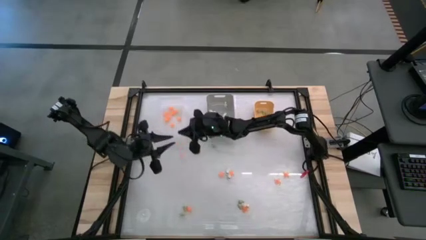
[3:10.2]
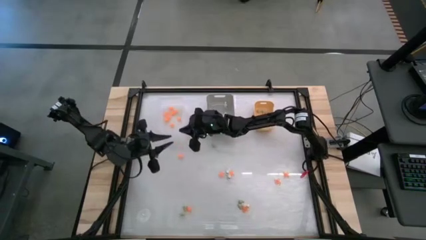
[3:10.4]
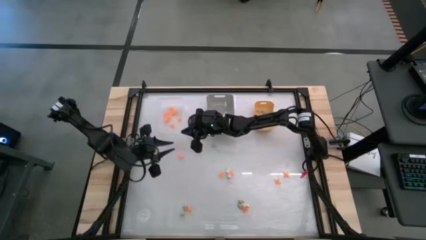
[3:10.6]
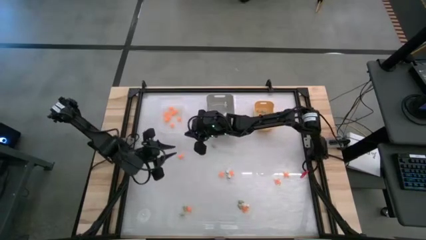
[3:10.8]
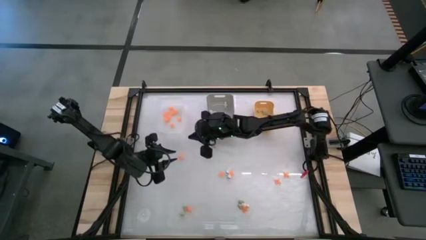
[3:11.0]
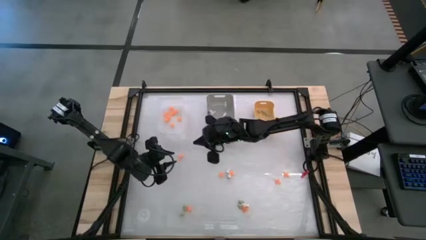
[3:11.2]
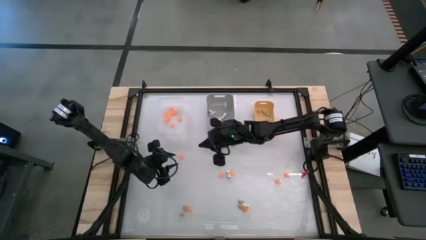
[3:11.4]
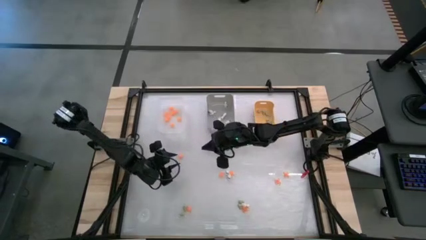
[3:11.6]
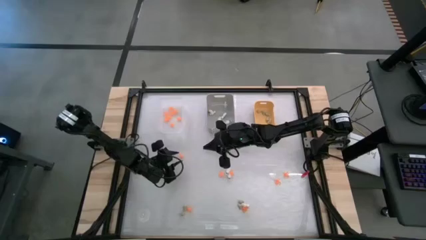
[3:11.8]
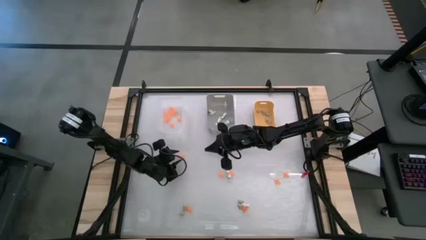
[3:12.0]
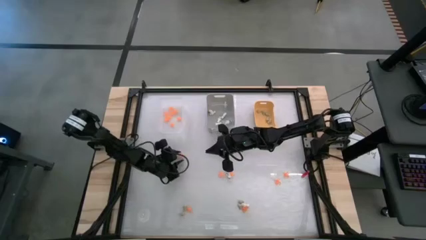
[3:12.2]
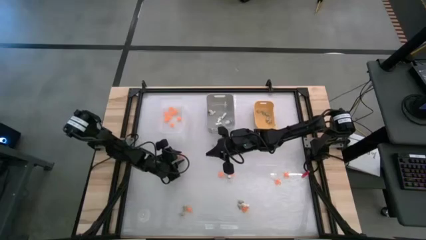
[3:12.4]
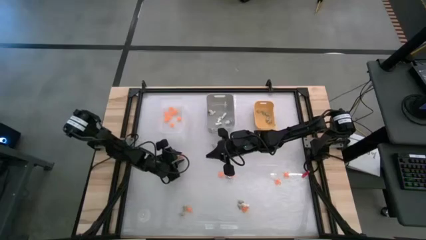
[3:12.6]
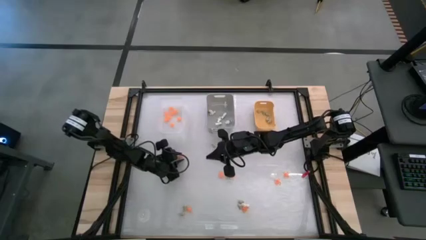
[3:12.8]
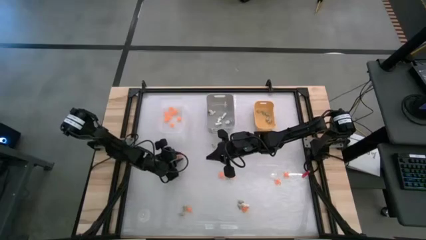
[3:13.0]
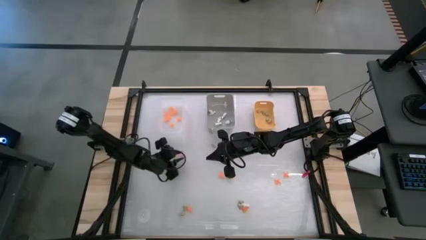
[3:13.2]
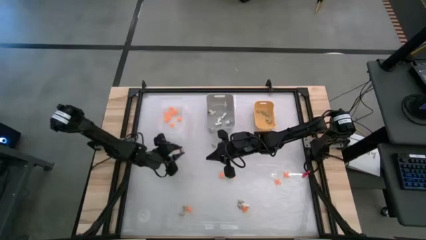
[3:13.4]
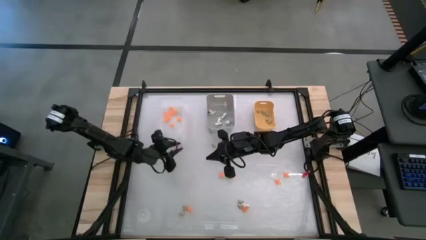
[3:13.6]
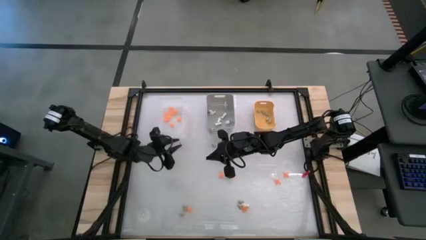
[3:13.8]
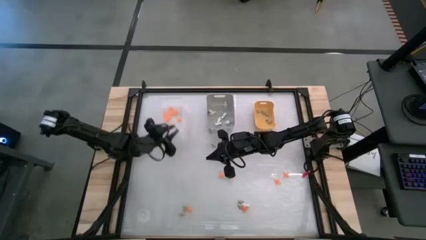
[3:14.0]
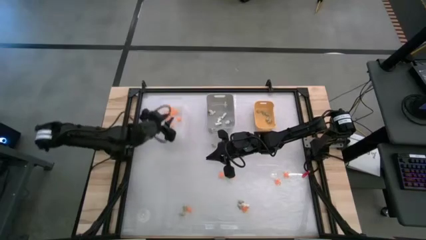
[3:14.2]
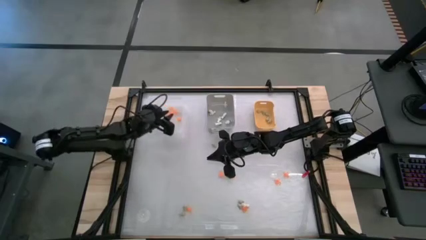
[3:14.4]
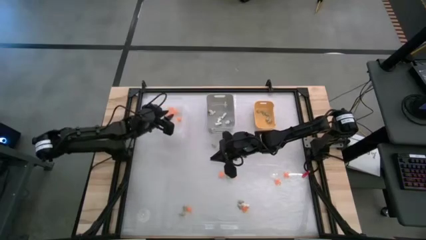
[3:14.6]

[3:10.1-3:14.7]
Task: Sort Halloween decoration
Put the orange spider toy into the transparent white bin

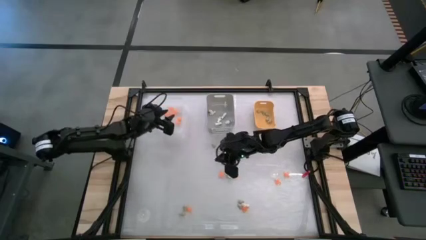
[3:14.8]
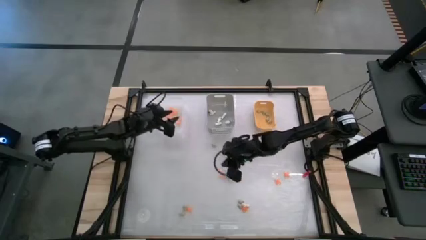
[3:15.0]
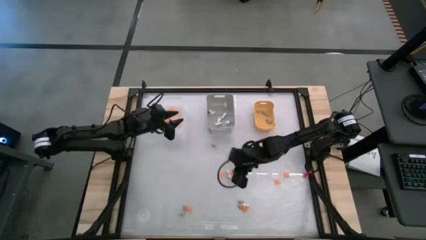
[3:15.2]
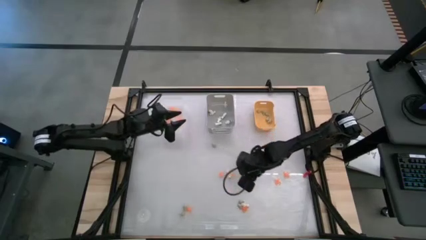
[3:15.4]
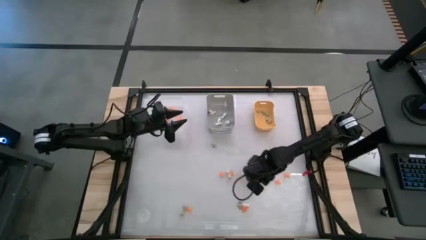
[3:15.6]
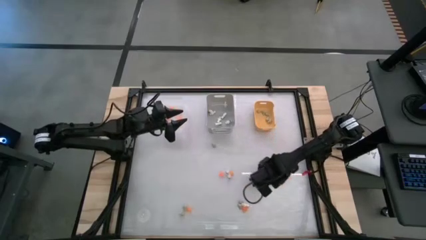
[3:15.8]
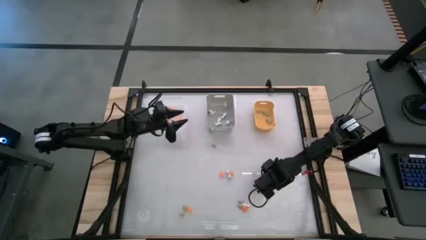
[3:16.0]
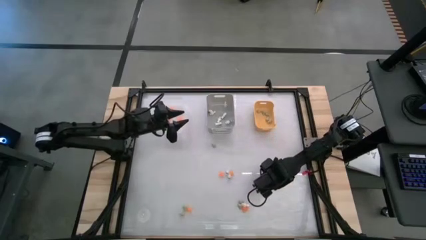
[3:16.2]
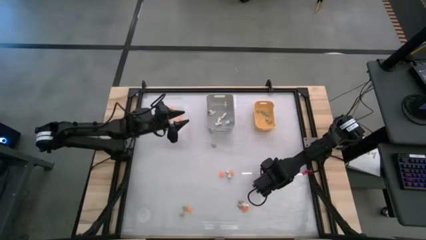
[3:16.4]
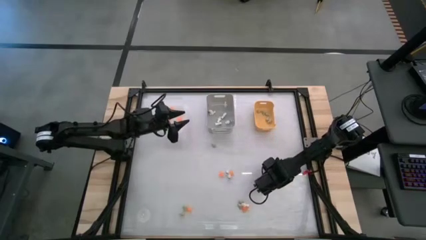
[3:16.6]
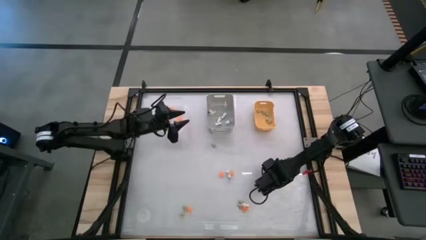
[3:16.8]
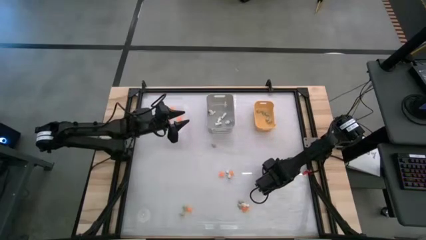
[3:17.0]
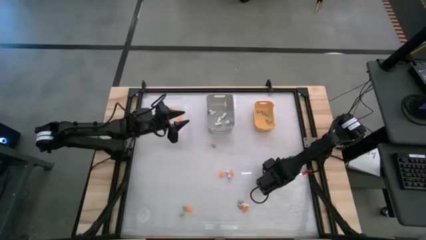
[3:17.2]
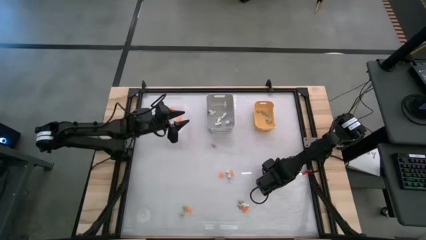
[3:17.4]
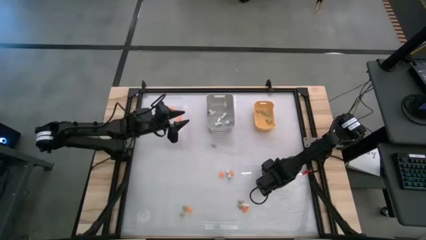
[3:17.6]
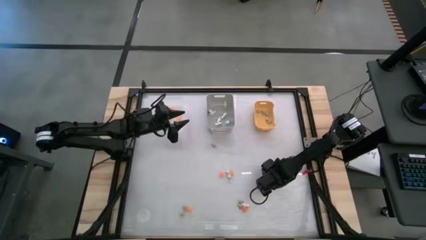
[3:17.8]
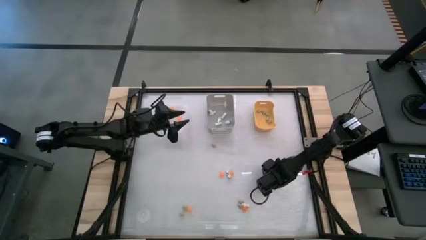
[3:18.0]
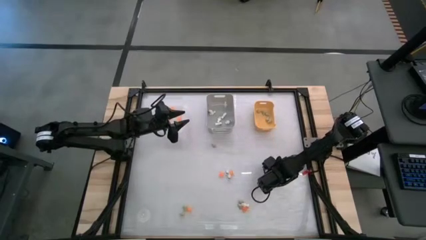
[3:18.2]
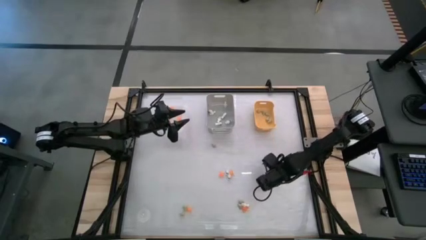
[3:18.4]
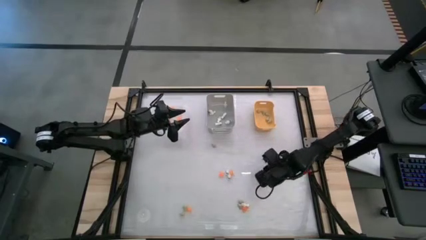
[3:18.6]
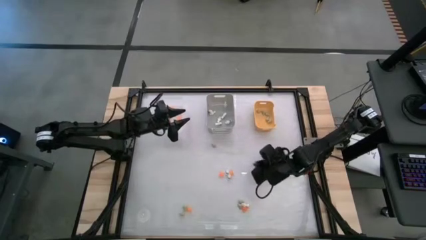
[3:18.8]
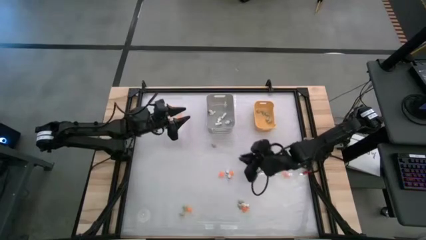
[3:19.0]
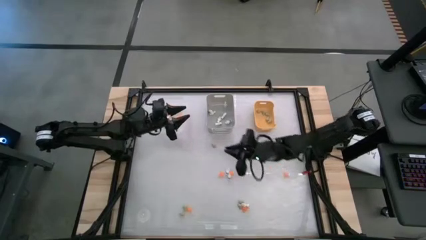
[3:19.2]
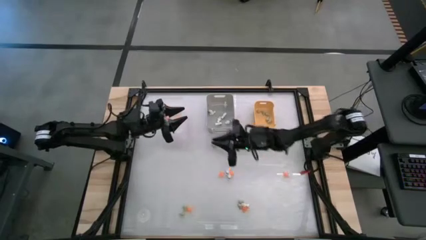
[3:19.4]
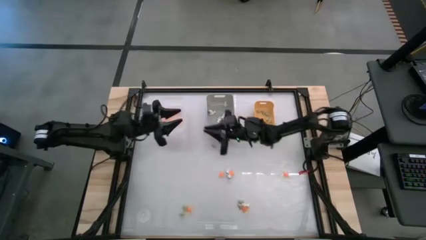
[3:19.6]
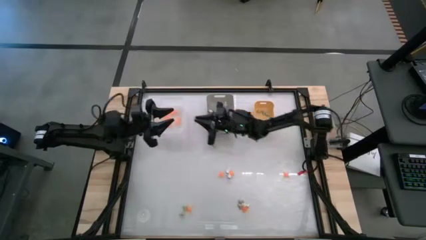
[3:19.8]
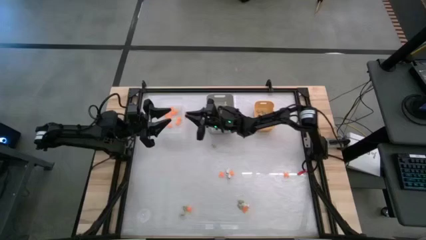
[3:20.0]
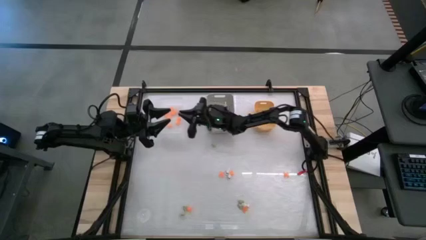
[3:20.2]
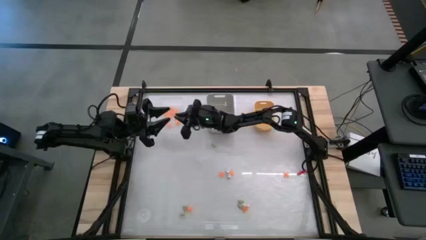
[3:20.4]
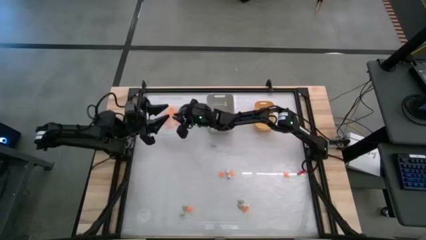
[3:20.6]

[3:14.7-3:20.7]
Put the orange spider toy into the transparent white bin

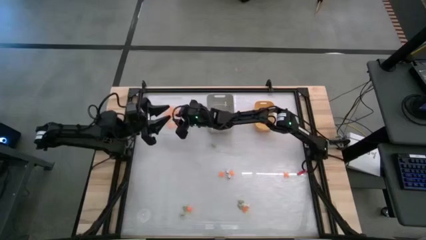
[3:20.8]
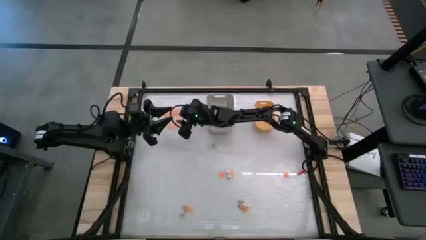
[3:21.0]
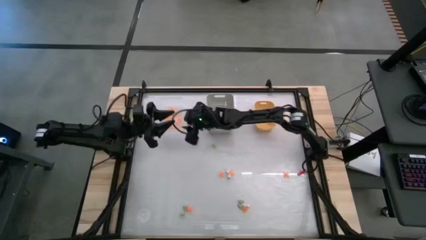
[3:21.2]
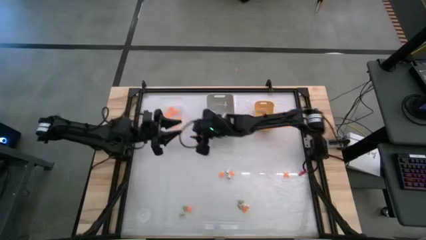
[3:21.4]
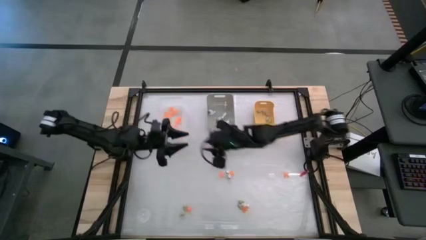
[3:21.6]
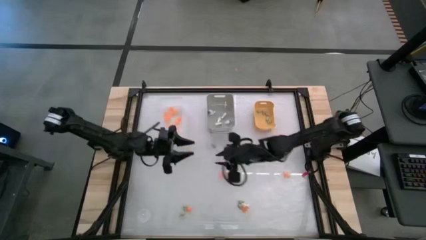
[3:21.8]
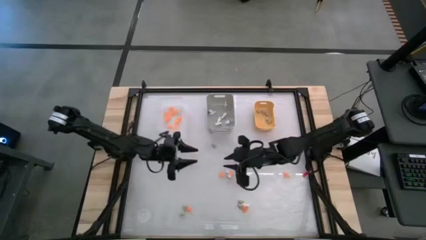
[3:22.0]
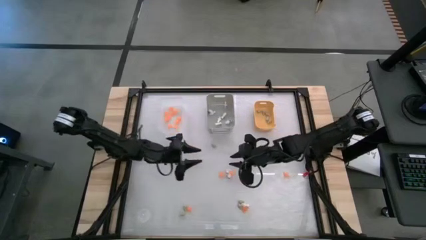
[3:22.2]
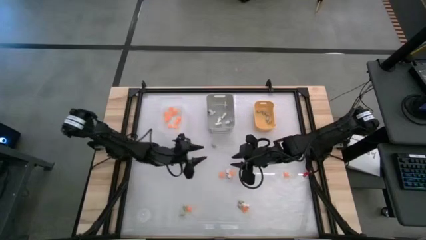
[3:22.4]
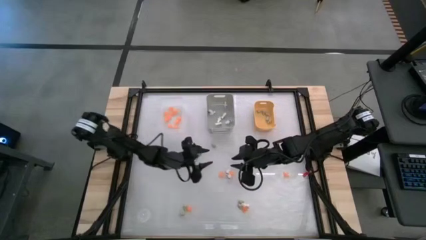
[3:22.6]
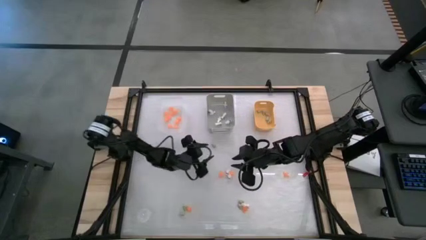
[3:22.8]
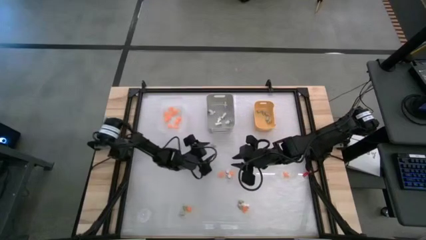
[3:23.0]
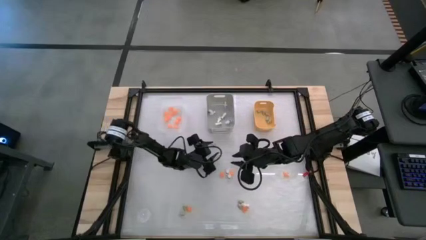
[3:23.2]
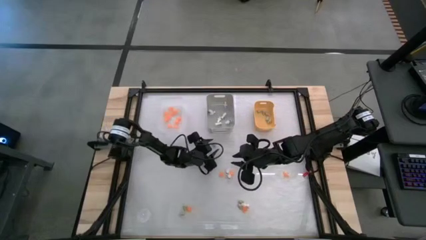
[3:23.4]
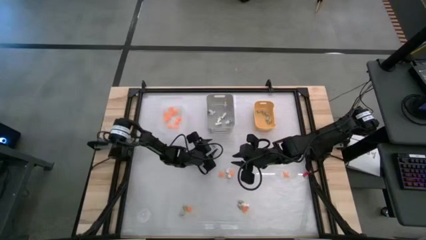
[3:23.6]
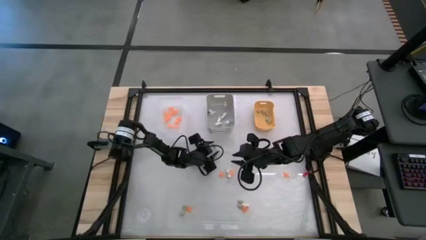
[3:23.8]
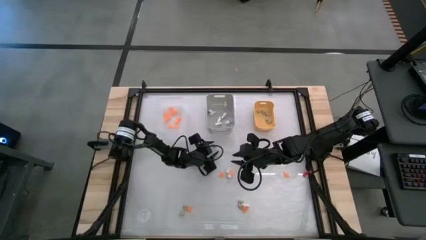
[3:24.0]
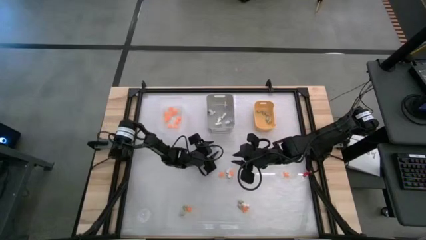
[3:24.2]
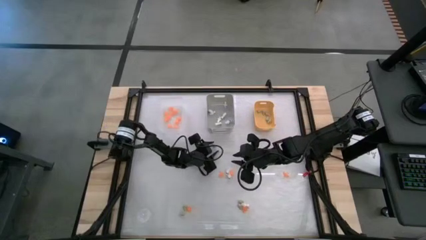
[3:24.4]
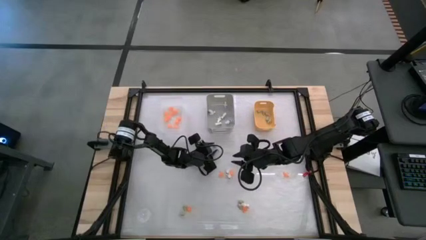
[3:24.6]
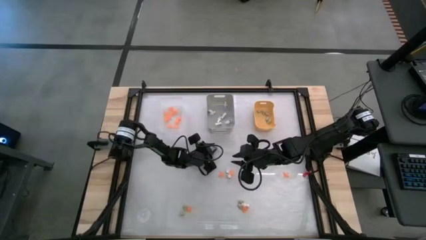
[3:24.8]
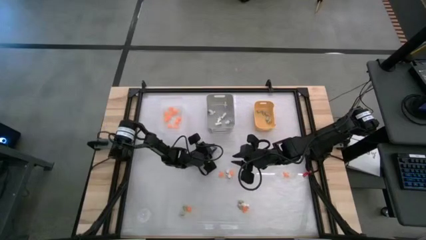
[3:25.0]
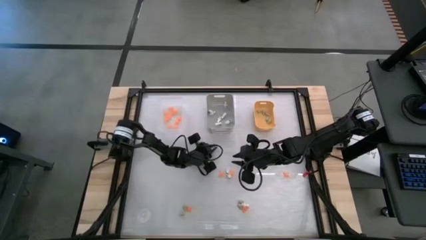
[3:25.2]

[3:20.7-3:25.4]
Put the cream white skull toy into the yellow bin

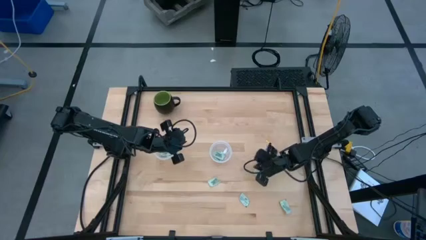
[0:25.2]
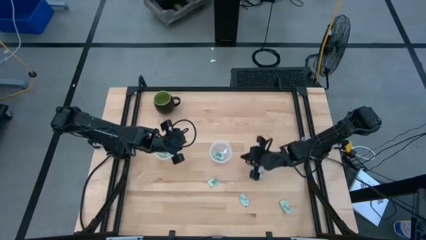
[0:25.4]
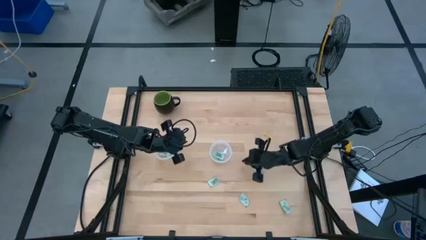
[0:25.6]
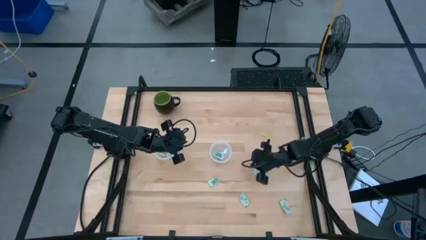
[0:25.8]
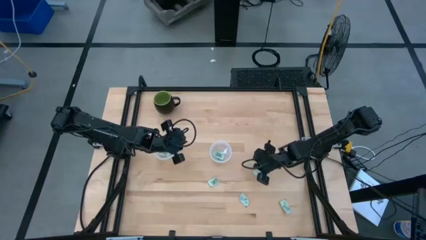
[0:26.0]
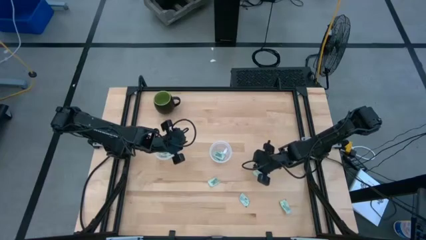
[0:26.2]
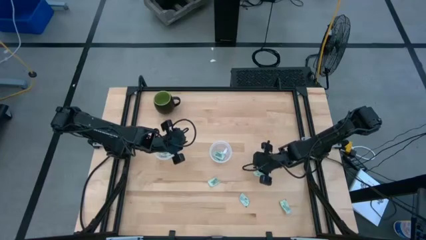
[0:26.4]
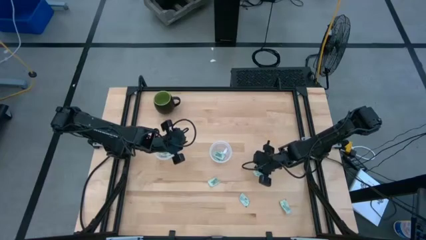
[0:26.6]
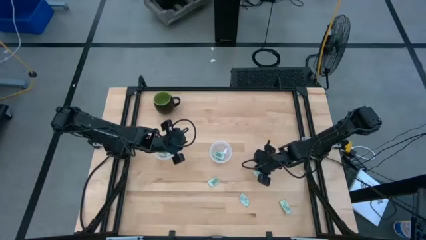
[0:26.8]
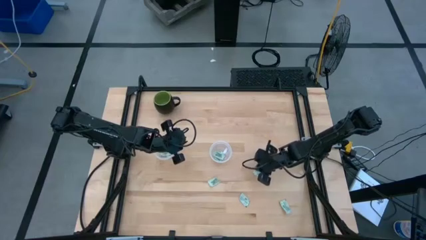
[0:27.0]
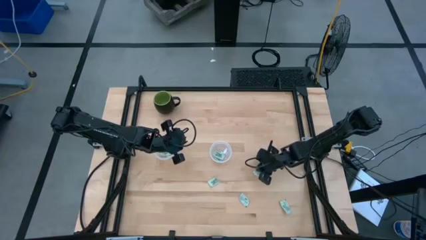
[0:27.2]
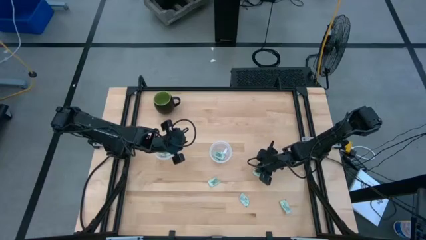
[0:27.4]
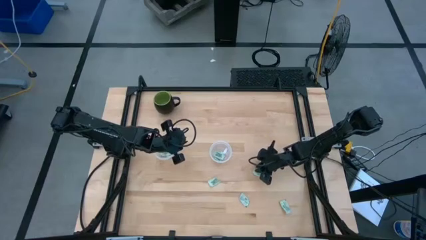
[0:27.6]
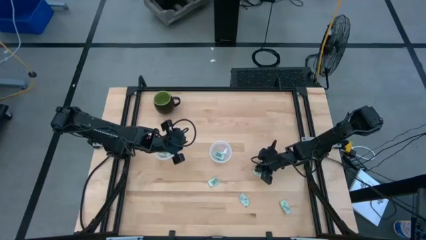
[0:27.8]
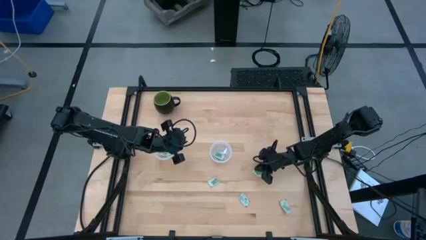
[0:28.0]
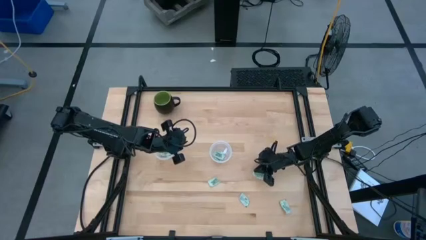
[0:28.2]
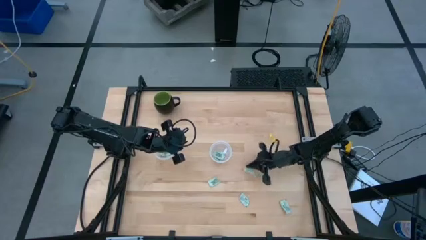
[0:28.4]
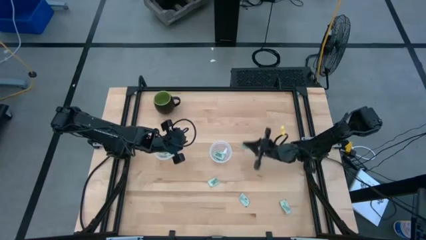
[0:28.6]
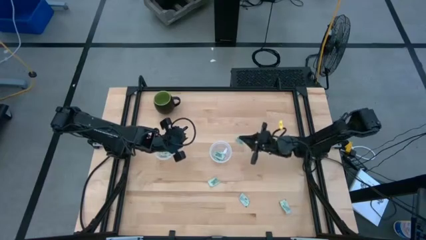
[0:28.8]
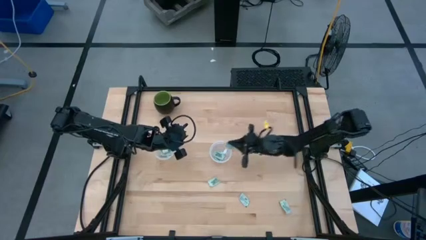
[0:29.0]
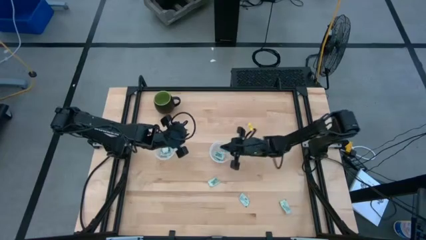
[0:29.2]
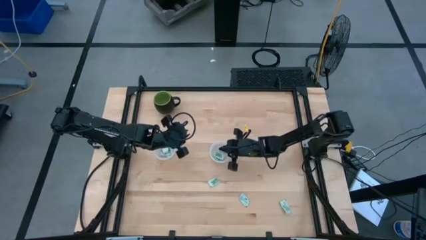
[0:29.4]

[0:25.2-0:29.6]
Task: Pick and place Stevia / Truvia into bins
Put the white stevia packet into the right transparent container
